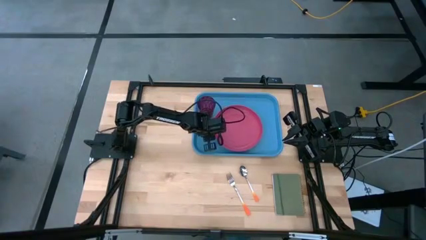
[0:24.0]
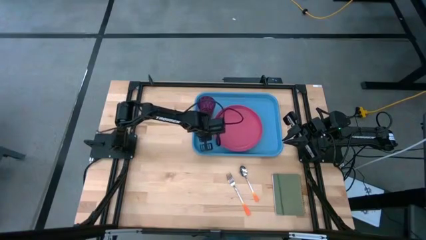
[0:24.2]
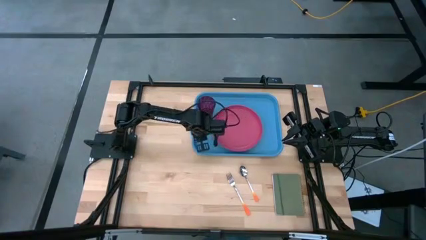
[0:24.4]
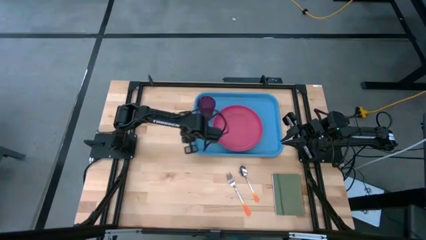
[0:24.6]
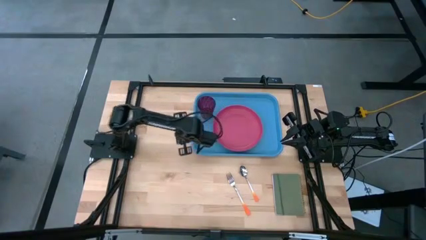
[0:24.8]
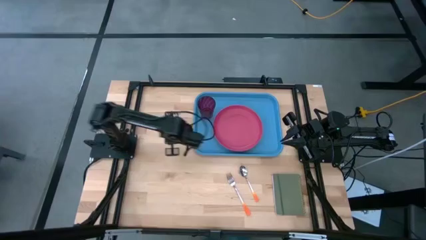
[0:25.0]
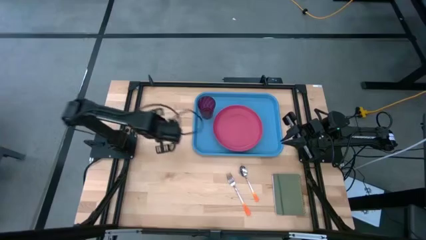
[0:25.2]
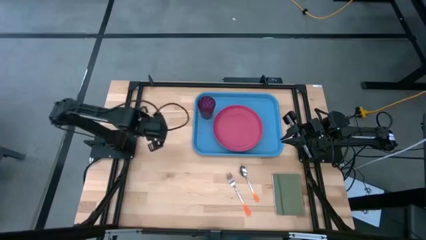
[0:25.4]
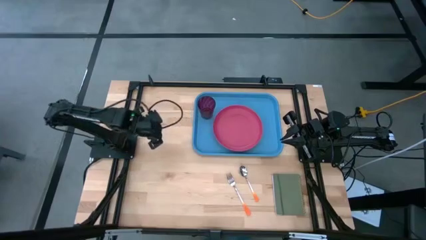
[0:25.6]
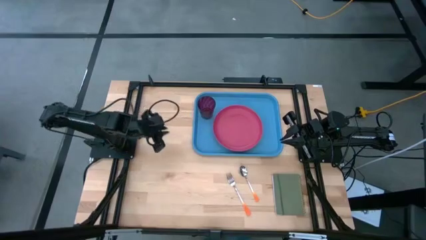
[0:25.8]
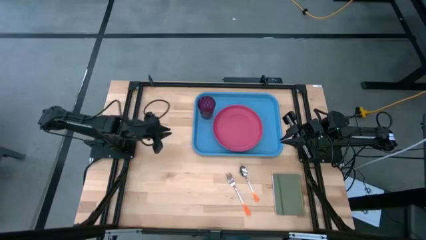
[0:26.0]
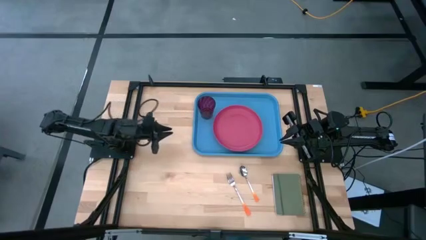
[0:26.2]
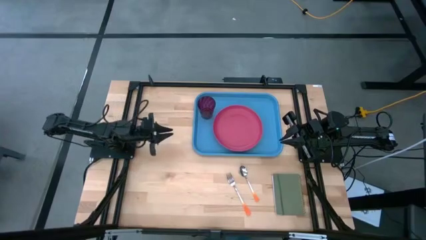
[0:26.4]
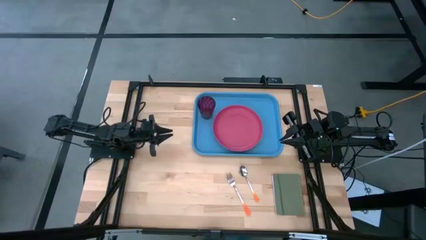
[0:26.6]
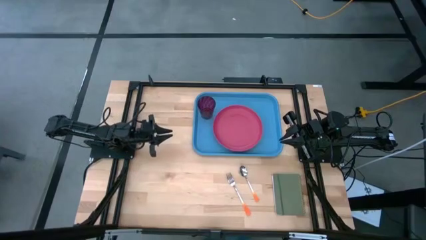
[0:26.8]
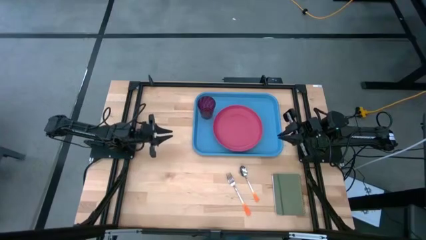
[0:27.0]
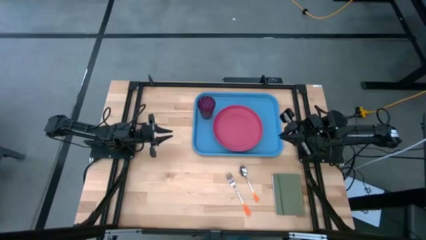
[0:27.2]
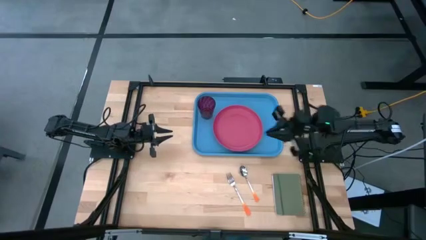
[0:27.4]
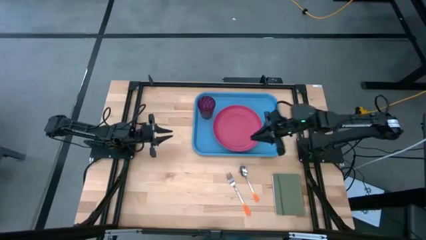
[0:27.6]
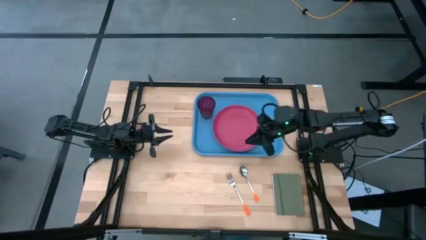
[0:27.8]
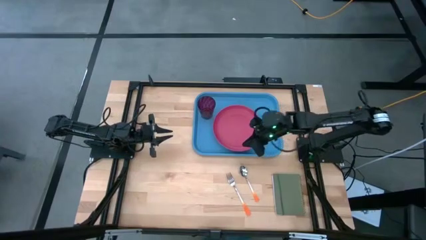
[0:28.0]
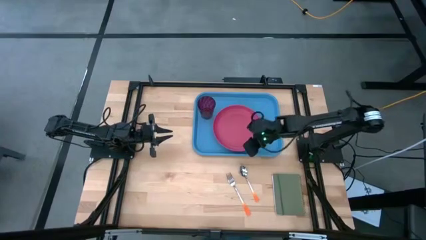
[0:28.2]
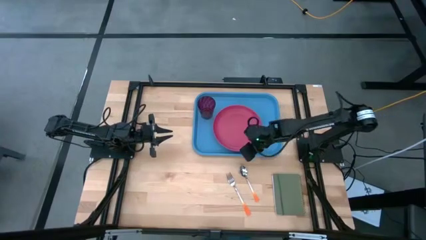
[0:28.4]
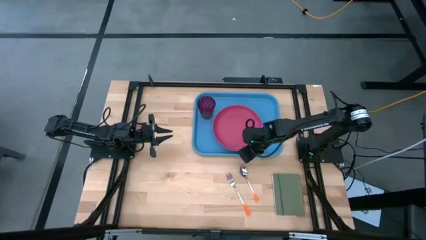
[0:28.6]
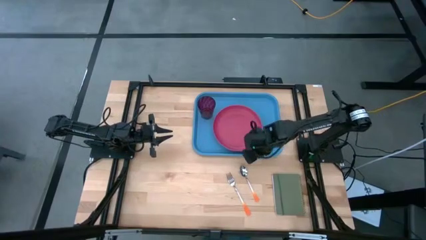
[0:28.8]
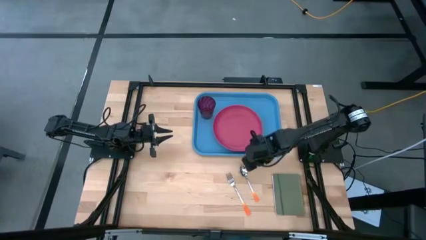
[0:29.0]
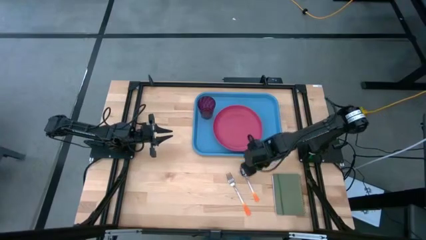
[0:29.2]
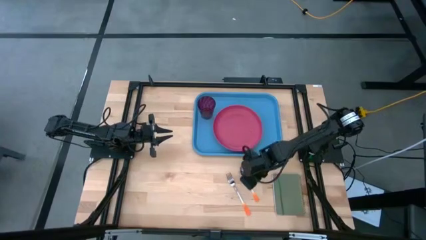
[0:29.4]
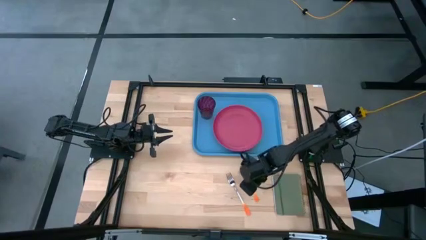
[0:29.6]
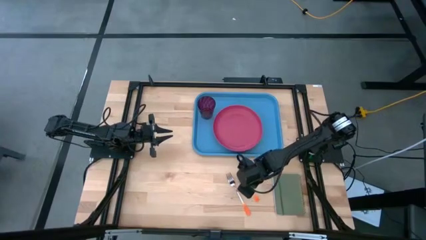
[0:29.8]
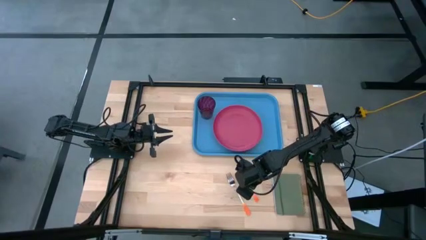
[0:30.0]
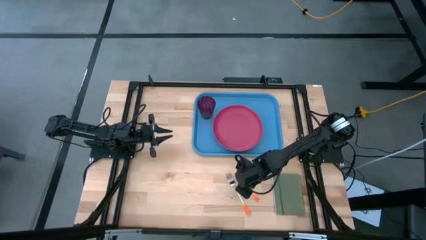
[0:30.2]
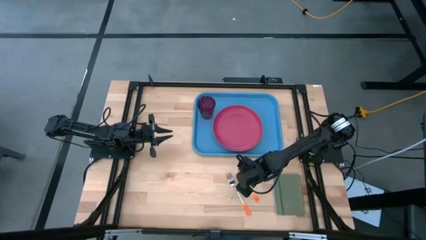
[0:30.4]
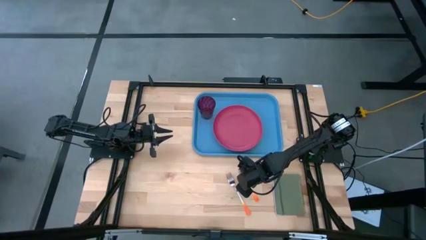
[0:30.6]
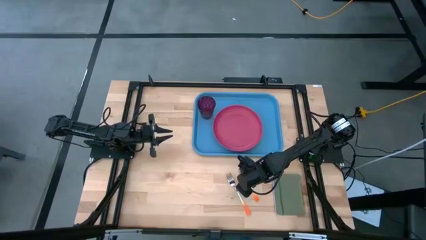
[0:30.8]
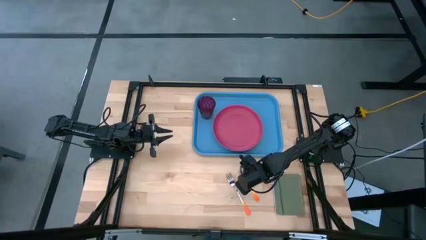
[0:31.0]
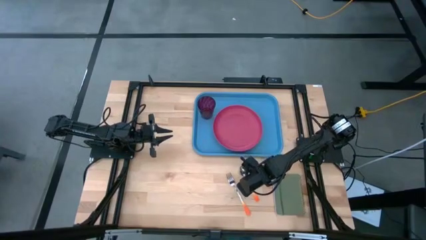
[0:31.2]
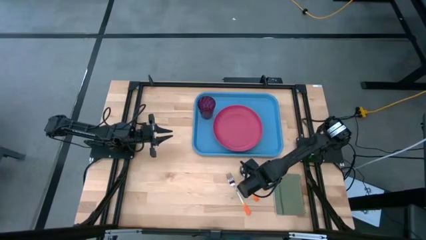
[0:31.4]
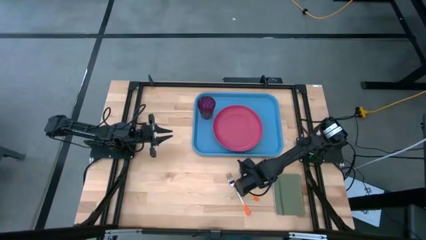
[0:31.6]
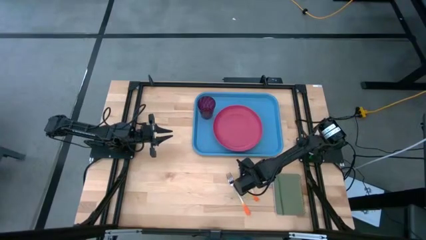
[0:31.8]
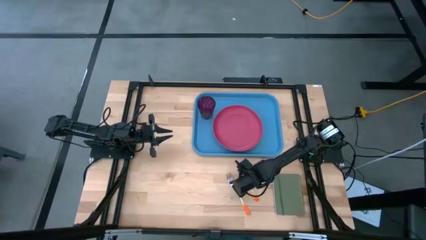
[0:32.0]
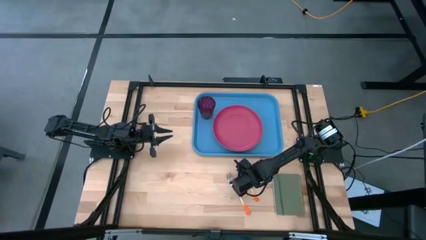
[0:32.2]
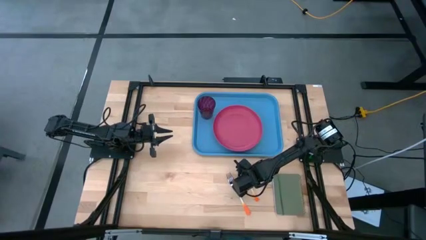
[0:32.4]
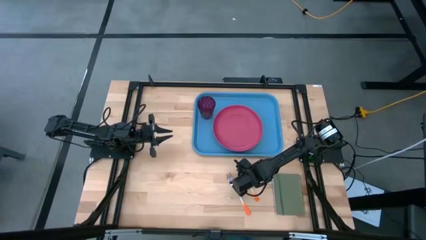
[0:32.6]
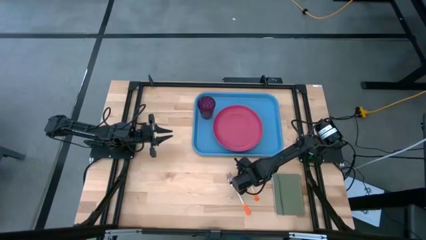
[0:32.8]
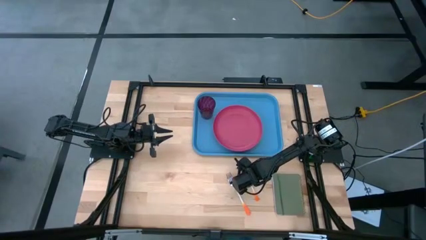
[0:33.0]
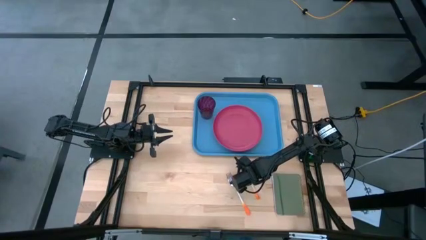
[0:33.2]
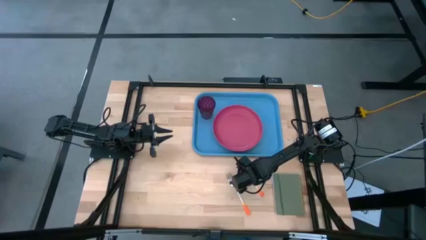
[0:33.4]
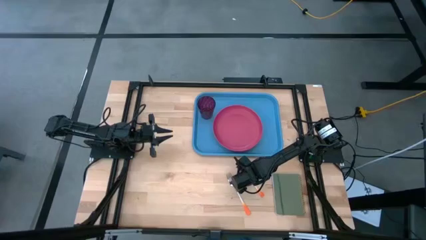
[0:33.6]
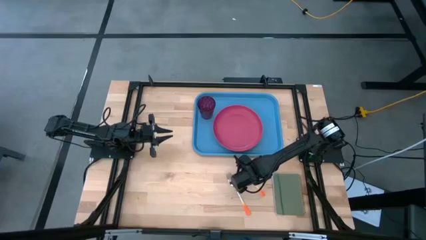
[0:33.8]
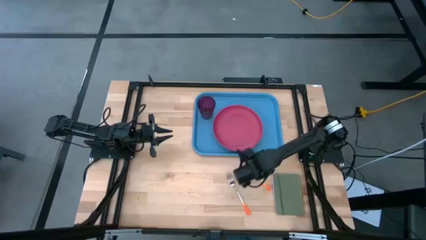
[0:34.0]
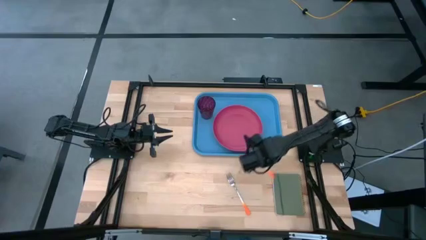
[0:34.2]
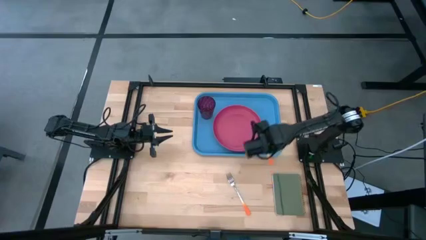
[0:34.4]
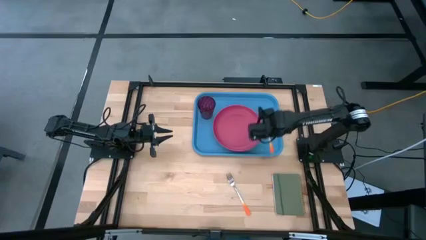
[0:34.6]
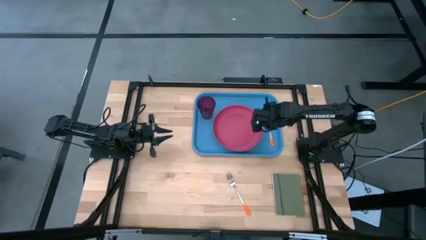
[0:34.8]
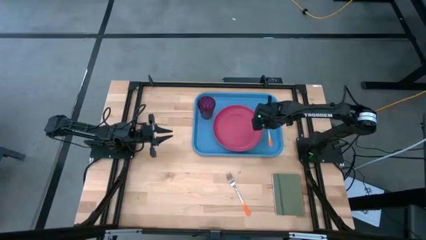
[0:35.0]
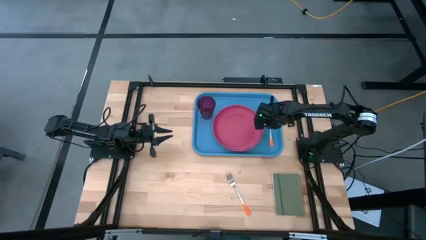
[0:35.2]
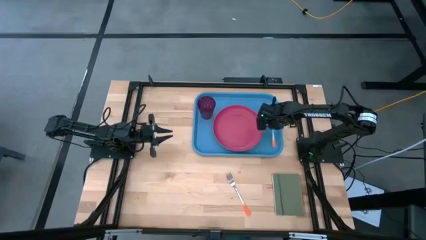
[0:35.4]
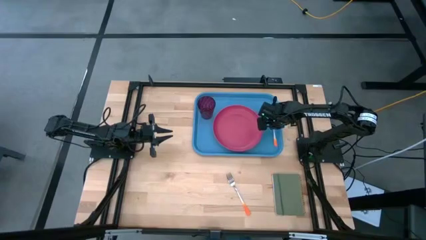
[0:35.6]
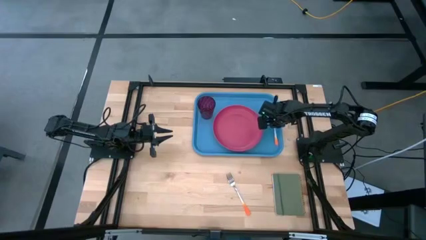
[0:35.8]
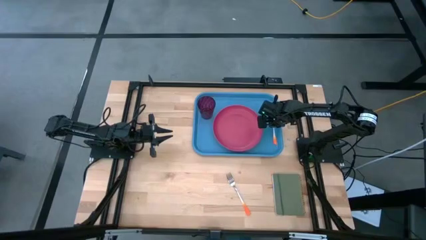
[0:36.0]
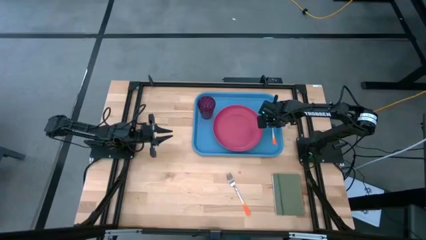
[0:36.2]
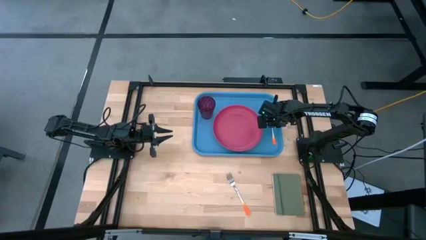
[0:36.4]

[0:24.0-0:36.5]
Task: Pick and place plate/cup/fork/spoon on tray
Put the orange spoon on the blue tray to the right of the pink plate

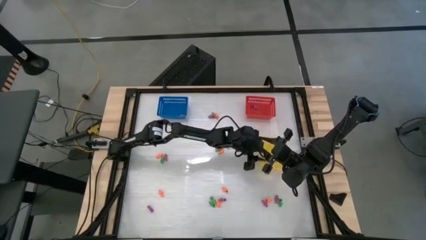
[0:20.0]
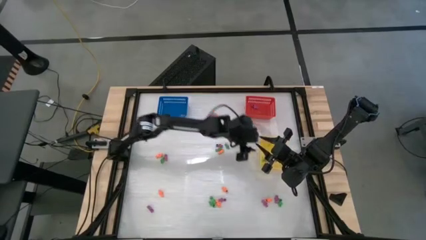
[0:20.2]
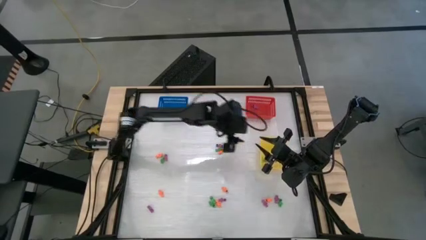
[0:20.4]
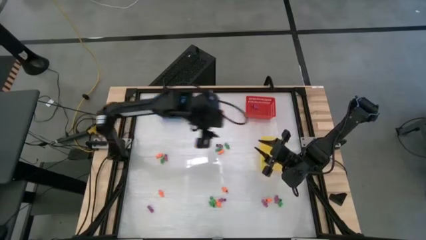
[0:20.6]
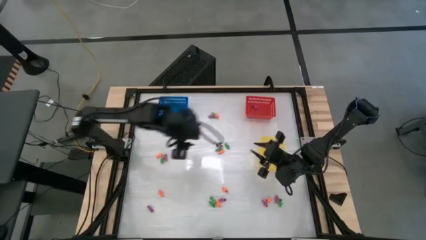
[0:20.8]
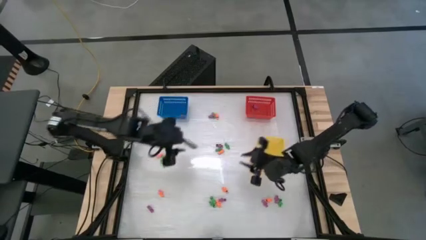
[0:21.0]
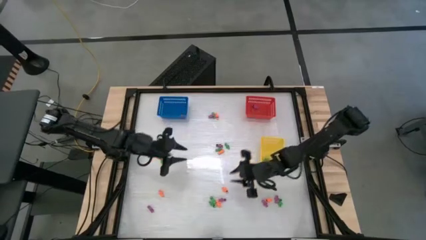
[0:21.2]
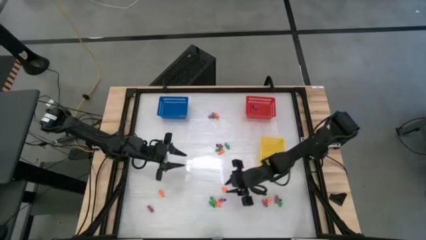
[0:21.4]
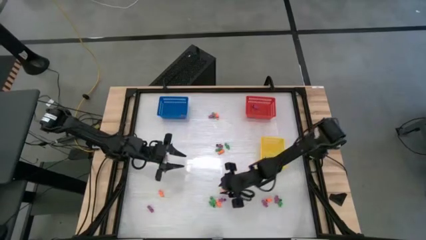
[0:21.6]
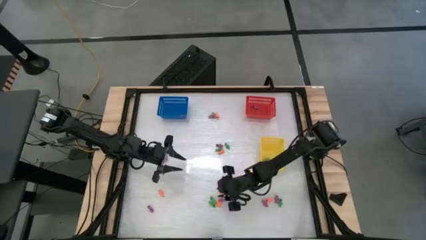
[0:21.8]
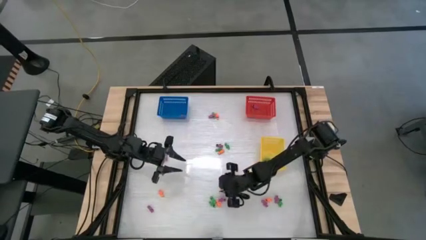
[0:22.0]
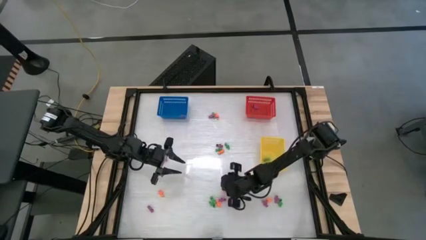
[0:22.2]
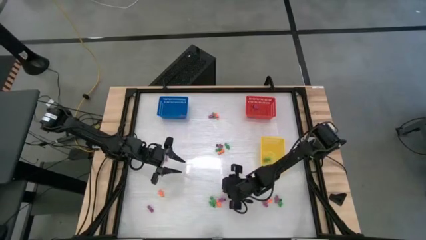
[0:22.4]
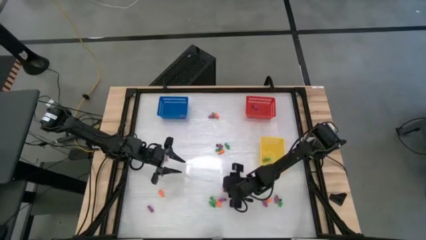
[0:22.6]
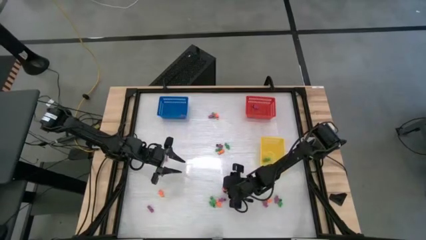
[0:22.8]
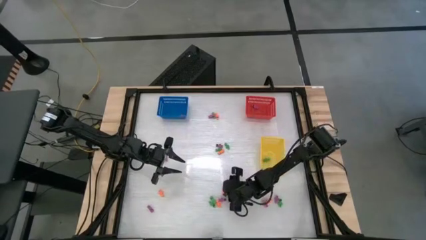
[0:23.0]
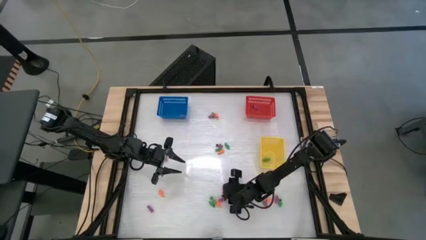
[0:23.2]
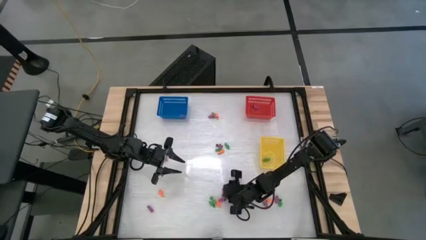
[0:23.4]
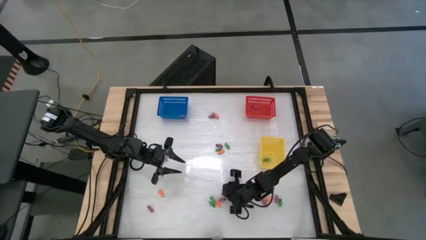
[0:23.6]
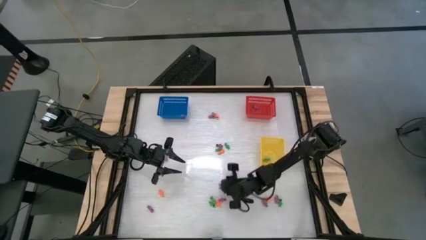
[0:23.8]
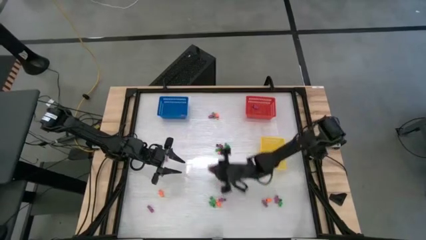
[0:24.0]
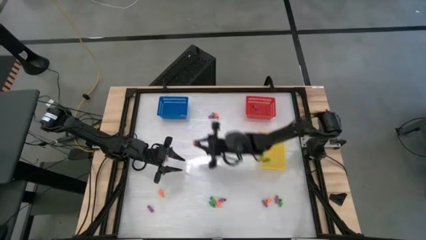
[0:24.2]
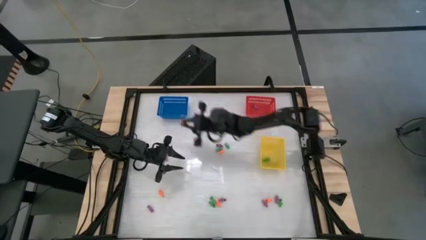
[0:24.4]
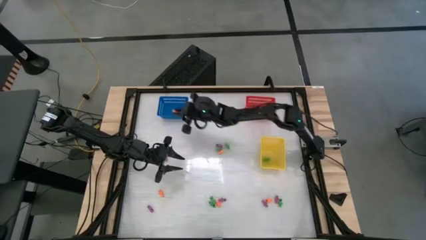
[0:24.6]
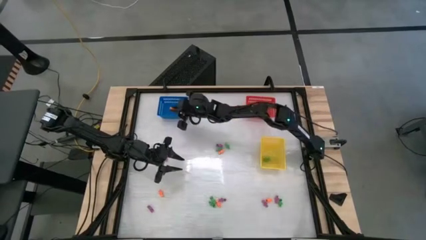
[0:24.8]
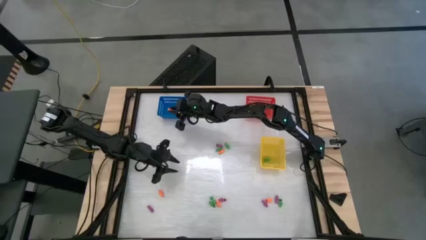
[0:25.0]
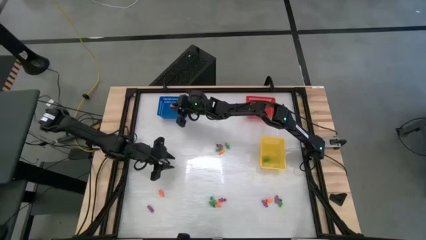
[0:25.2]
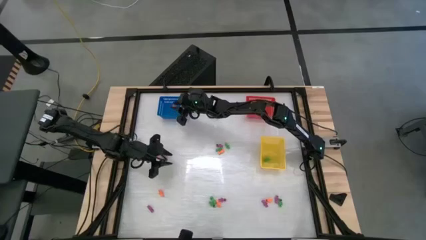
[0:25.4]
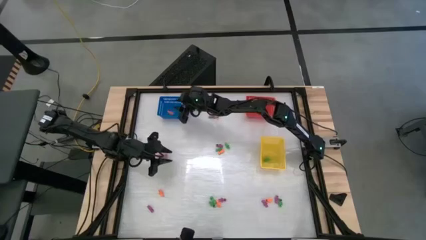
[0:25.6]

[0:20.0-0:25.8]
Task: Sort Halloween decoration
Put the orange skeleton toy into the blue bin
